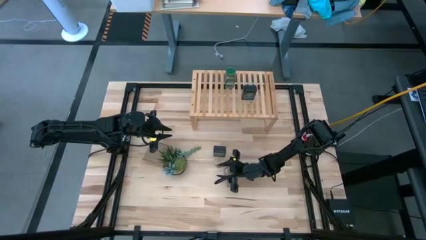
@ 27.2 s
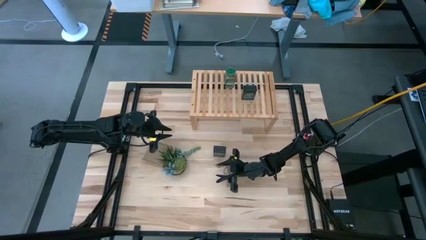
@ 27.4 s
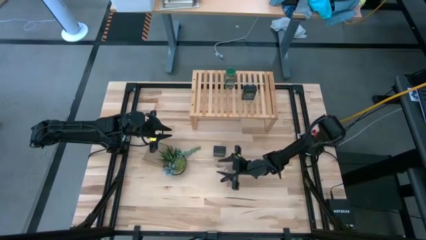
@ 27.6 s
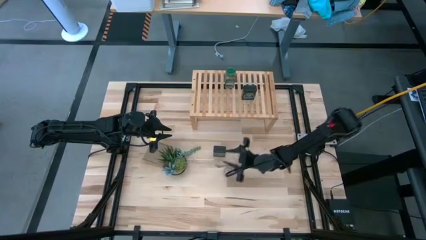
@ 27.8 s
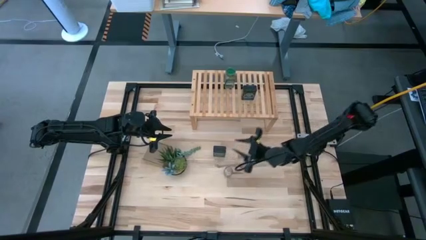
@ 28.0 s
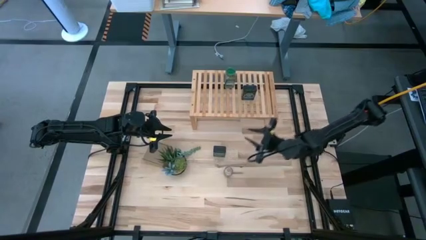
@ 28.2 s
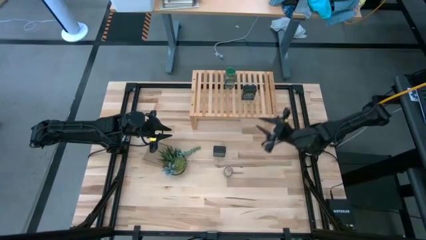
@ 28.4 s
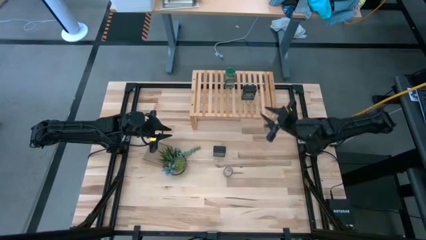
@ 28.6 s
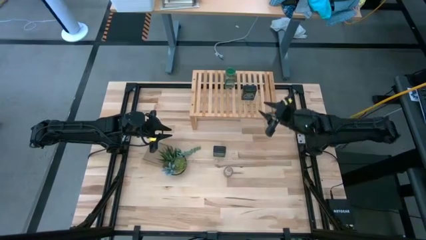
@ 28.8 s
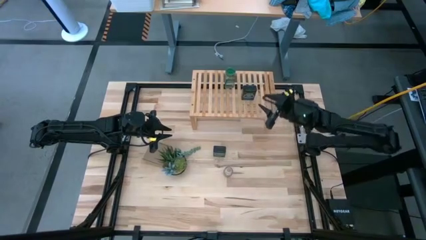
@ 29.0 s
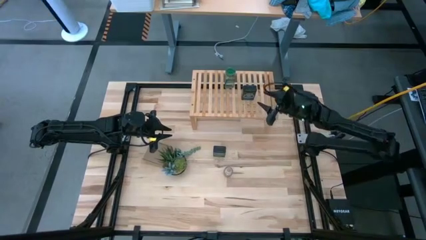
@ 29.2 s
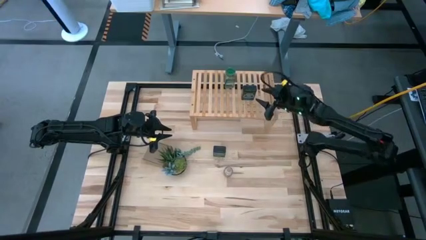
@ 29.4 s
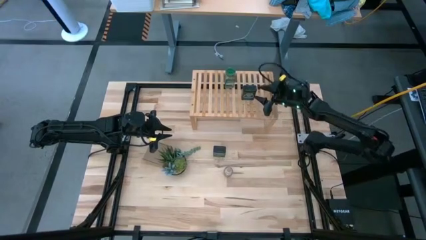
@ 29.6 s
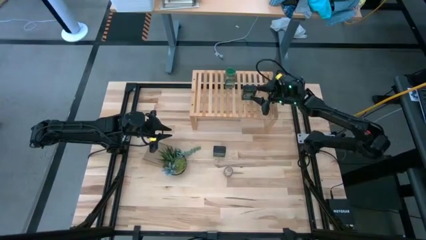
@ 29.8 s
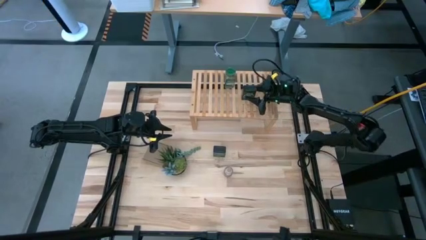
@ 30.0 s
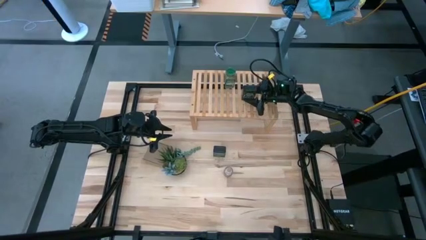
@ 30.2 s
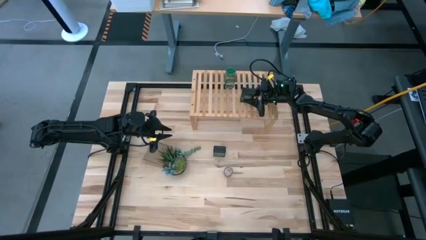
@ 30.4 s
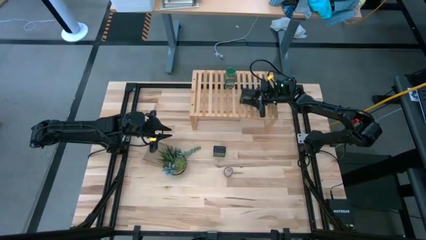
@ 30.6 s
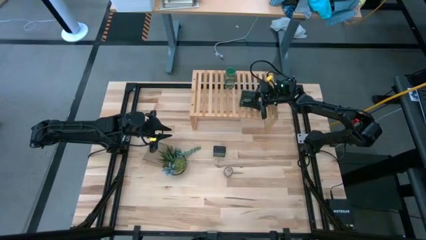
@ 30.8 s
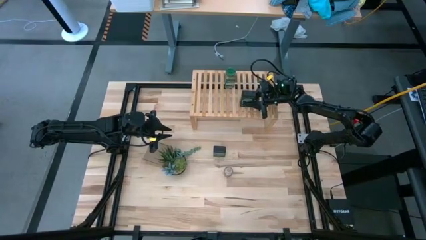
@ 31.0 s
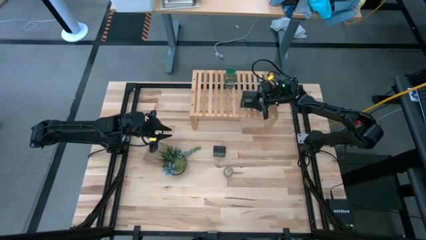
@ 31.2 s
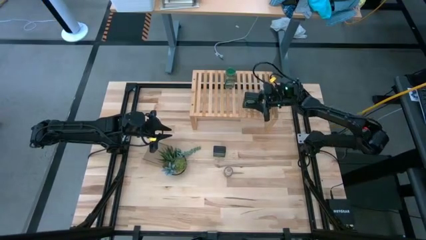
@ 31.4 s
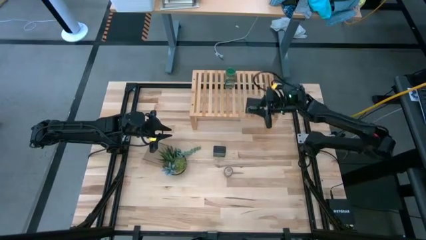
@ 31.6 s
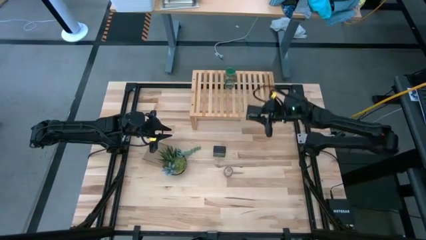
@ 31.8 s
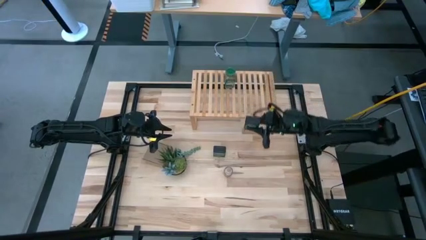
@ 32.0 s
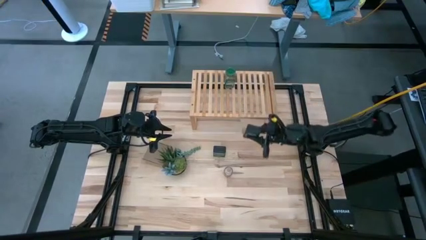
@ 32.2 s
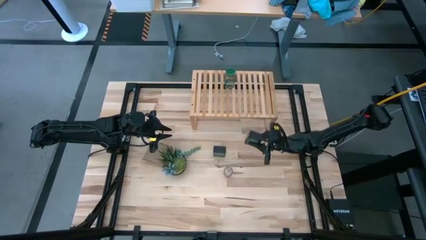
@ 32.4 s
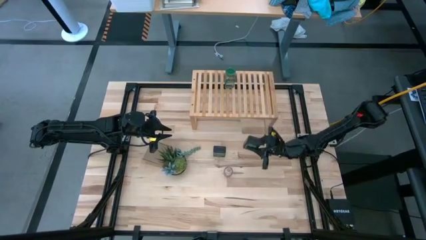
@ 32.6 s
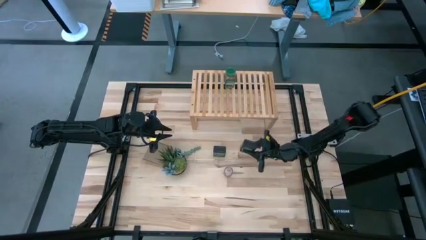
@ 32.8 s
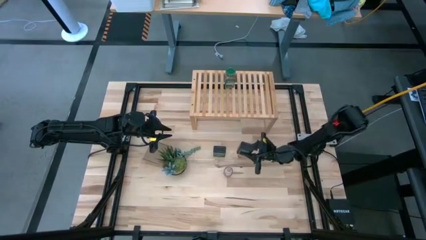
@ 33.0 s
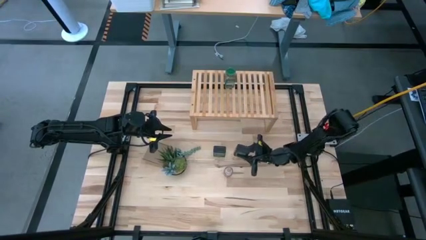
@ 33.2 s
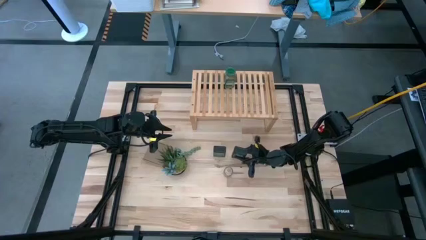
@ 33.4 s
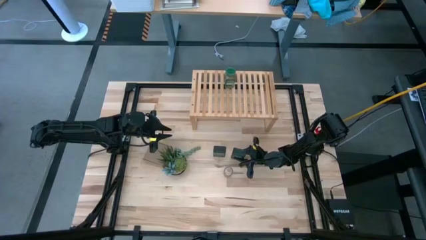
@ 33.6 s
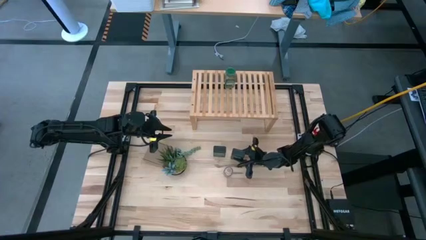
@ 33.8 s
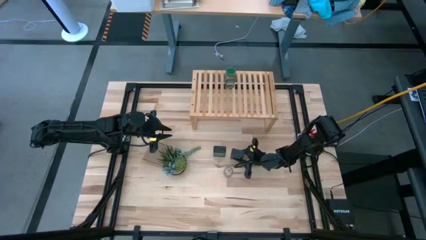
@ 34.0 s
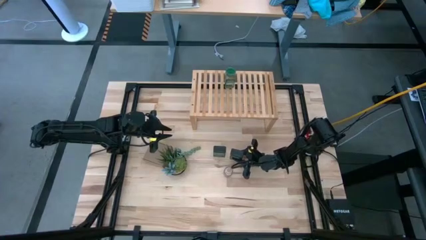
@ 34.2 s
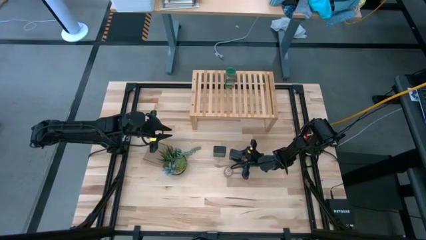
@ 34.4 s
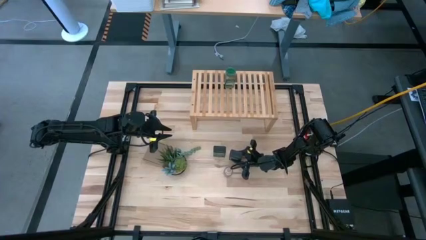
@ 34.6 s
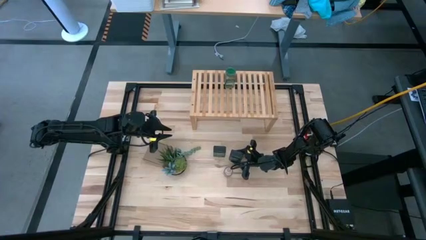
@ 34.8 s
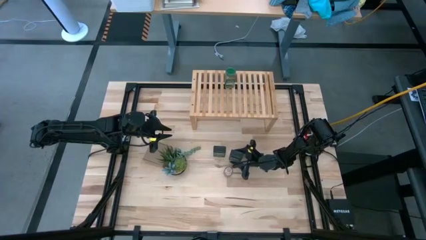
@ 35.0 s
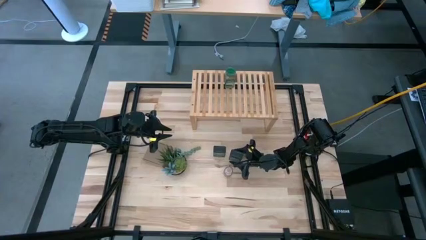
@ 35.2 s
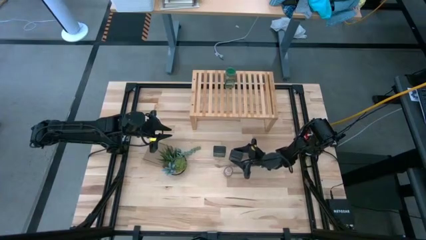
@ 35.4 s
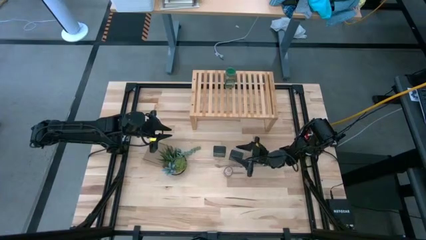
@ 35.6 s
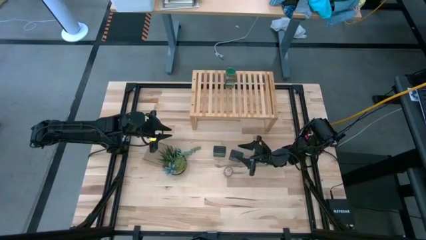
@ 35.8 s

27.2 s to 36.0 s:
Task: Shelf spices
Remove the green seasoning can from the shelf

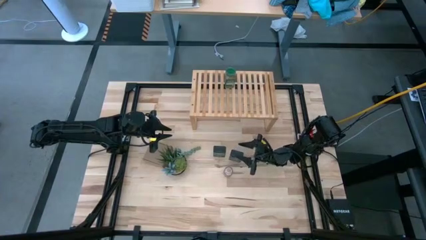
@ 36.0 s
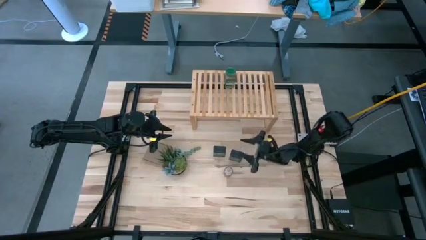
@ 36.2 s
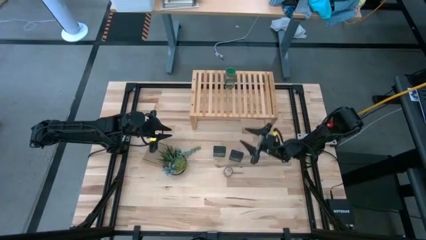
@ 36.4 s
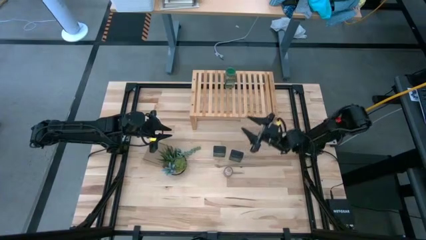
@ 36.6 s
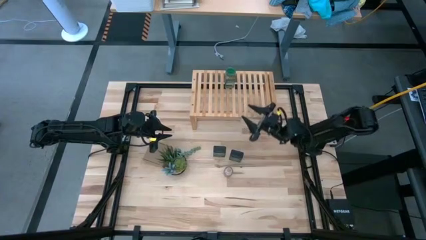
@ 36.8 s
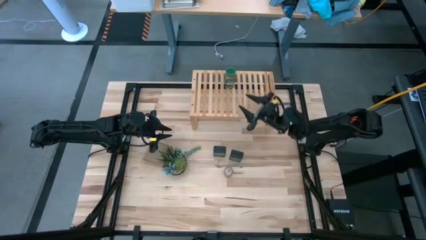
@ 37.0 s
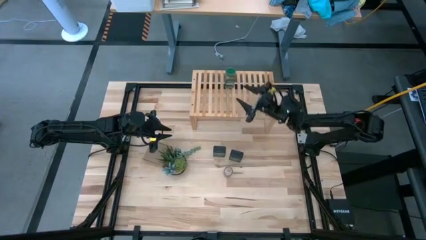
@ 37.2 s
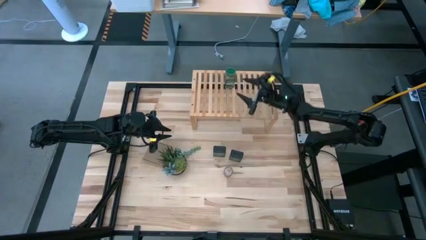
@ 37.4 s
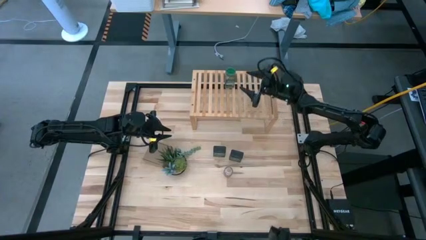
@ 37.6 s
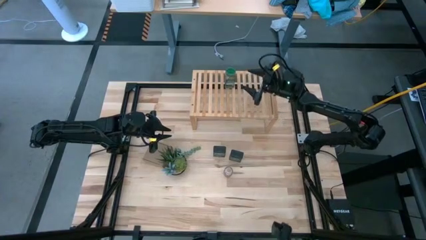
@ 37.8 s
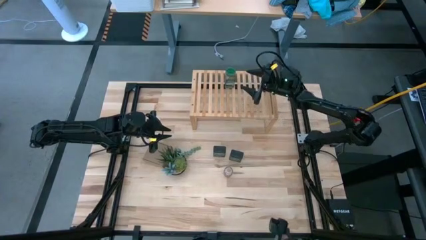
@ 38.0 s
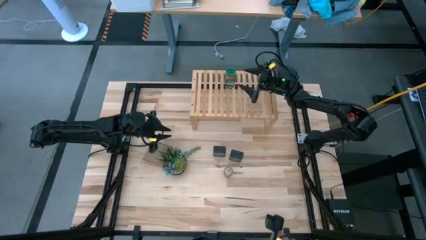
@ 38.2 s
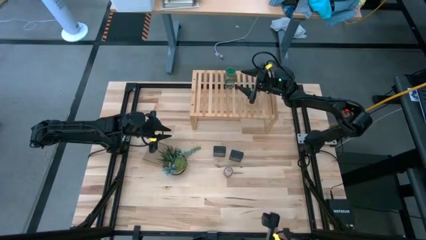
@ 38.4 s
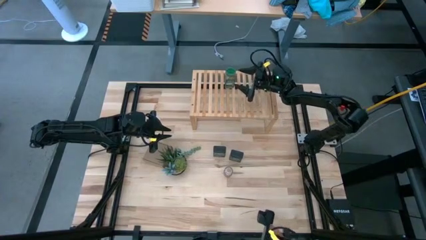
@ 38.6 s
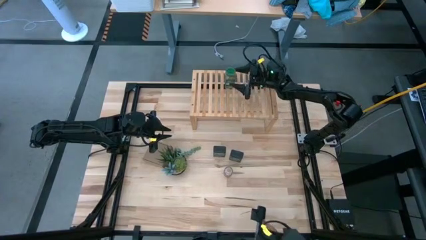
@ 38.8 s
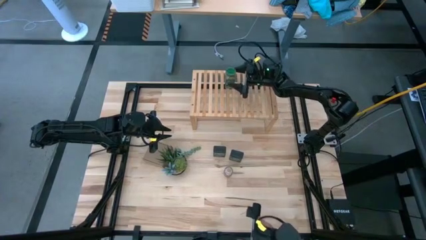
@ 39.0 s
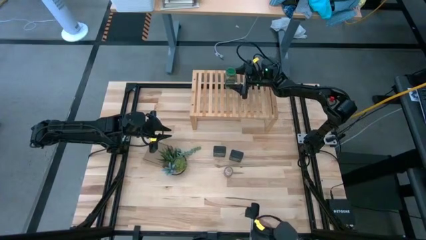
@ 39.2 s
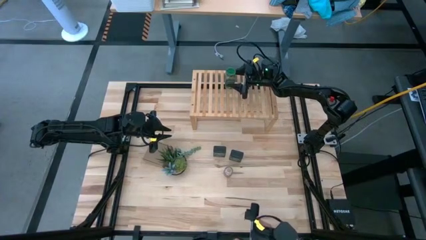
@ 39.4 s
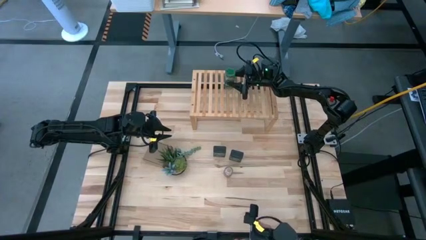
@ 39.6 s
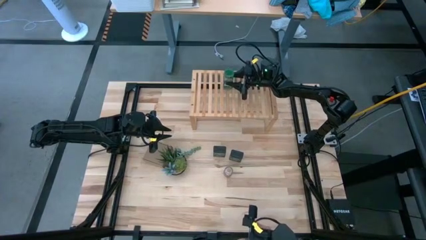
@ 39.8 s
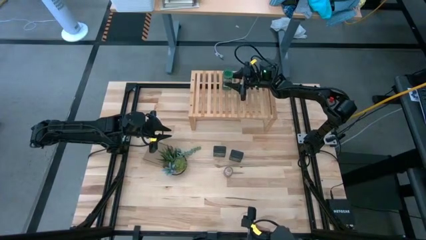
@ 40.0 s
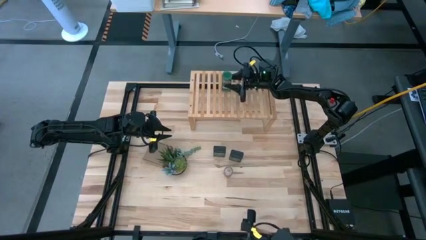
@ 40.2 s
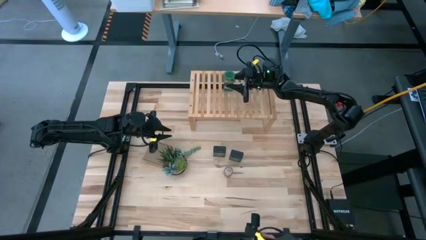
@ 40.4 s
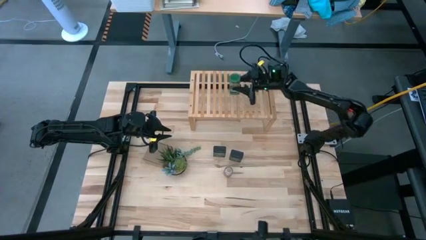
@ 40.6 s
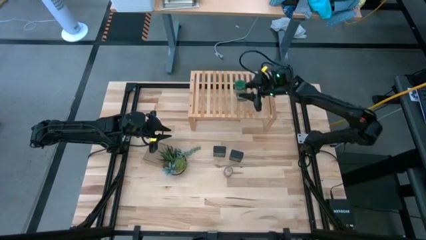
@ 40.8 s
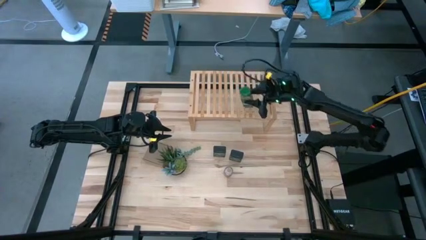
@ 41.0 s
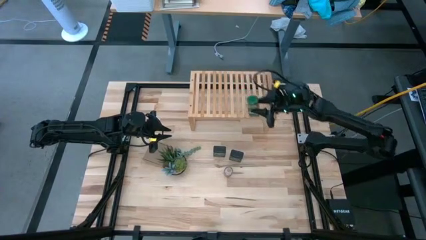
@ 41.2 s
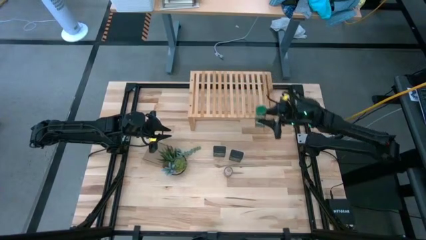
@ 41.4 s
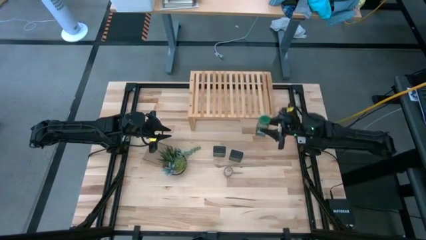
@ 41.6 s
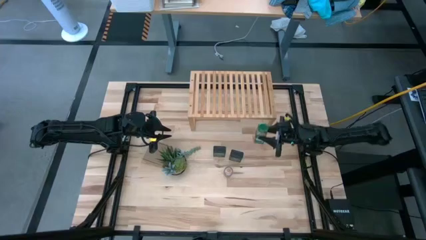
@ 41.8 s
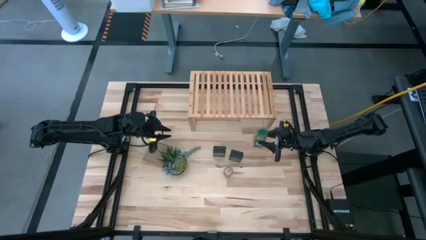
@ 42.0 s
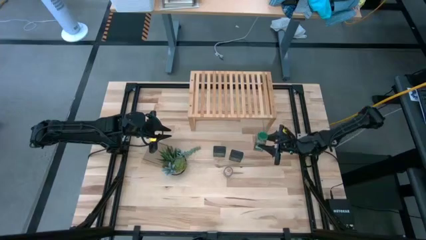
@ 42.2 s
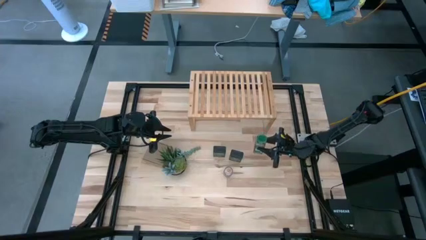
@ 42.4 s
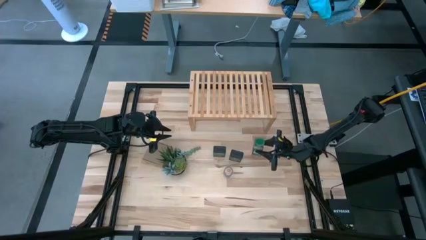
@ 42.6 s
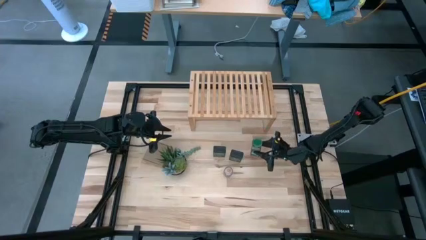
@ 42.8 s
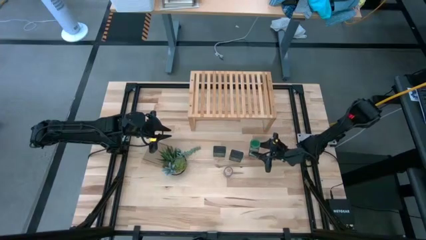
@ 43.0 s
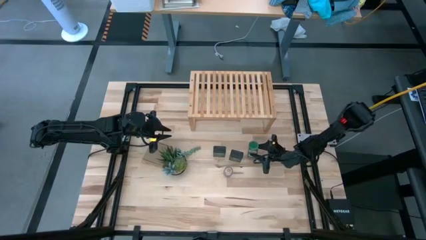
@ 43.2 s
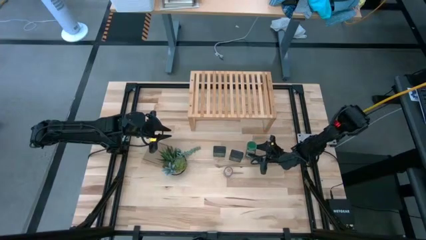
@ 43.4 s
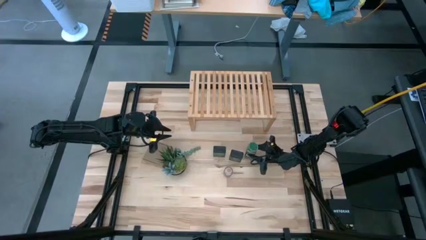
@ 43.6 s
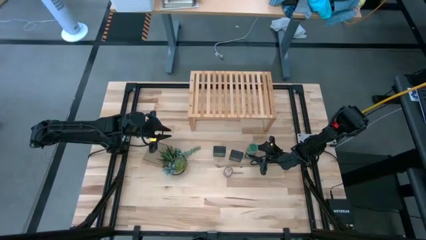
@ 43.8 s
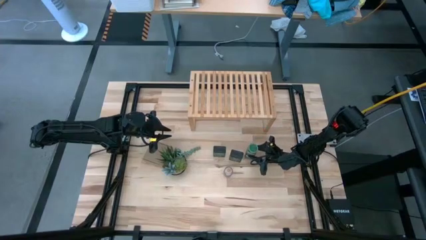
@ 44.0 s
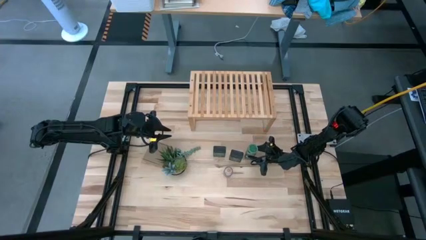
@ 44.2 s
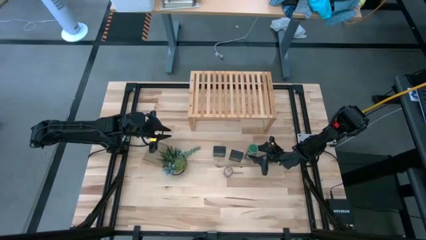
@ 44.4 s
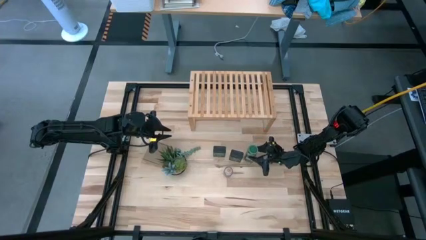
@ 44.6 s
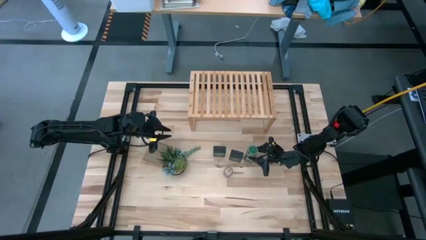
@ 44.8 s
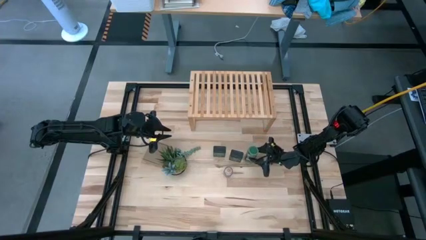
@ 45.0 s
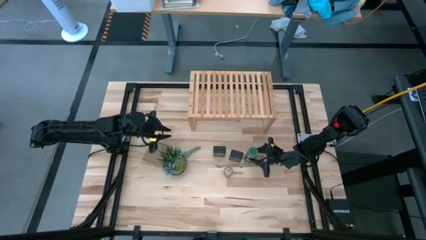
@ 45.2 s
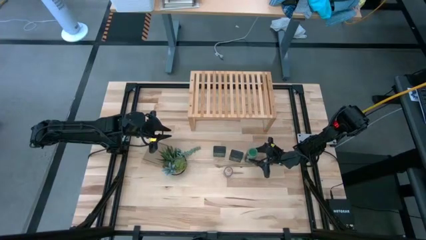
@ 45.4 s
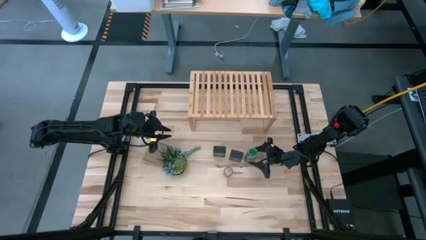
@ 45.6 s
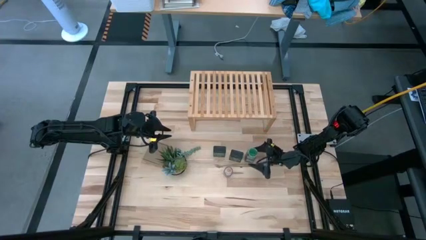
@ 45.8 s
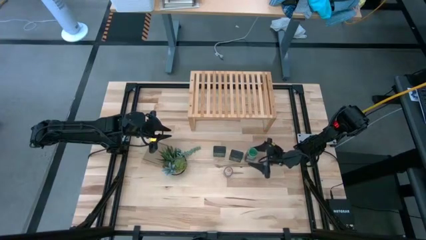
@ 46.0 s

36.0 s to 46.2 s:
Remove the green seasoning bottle from the shelf
